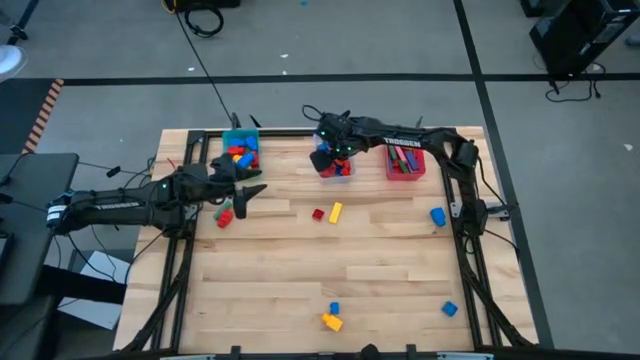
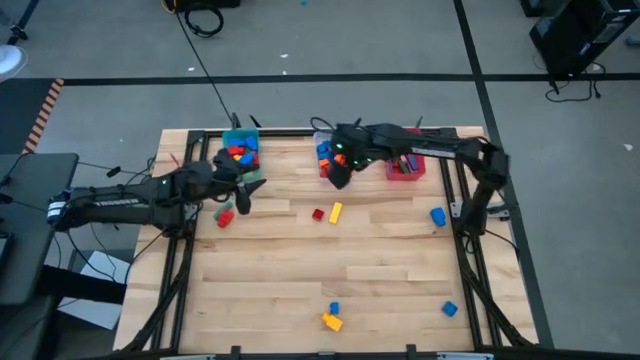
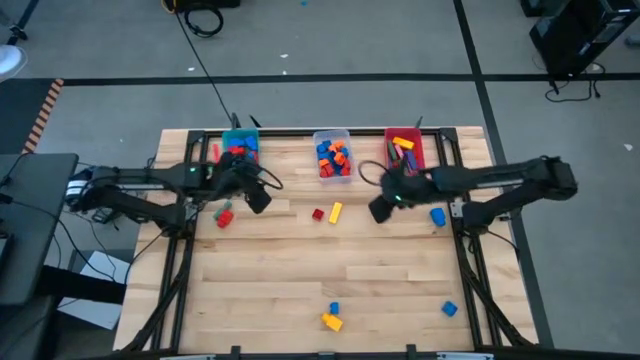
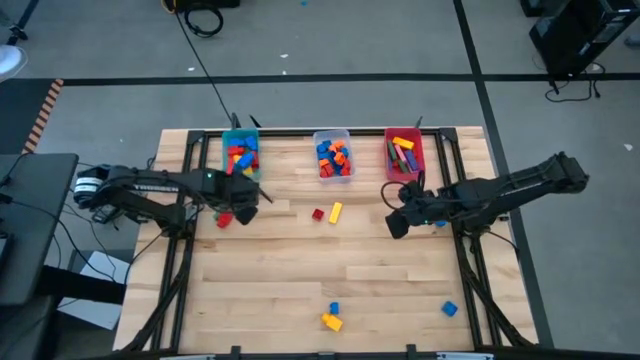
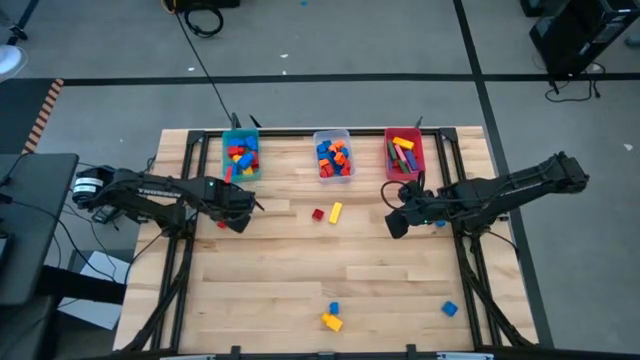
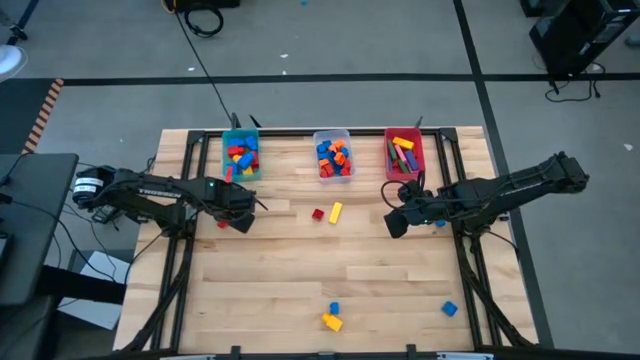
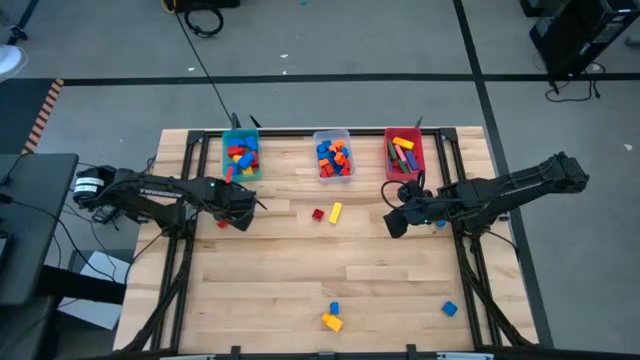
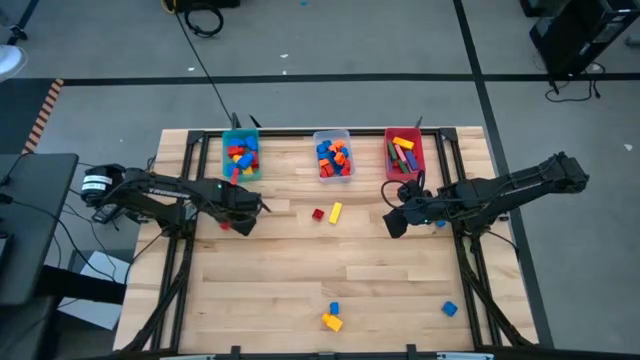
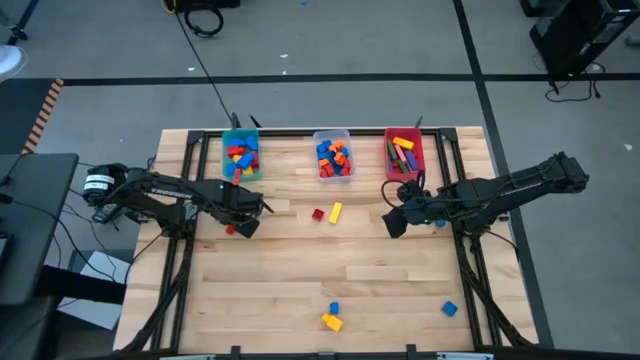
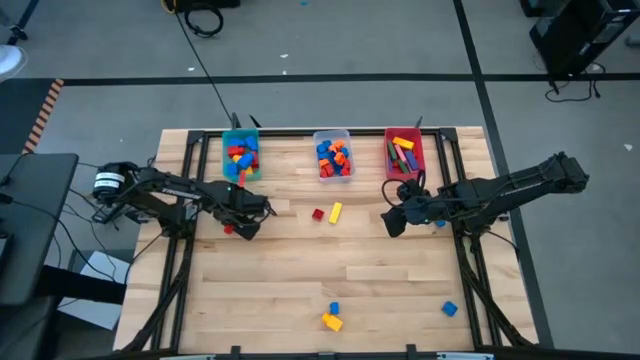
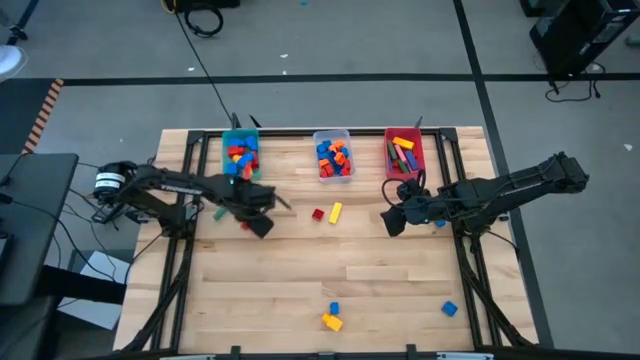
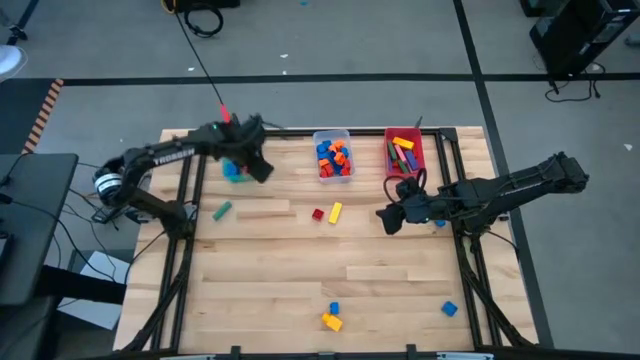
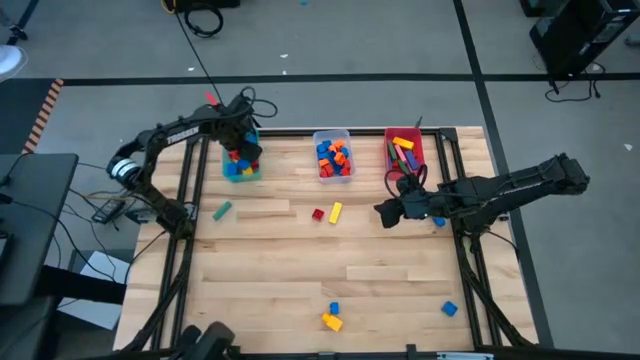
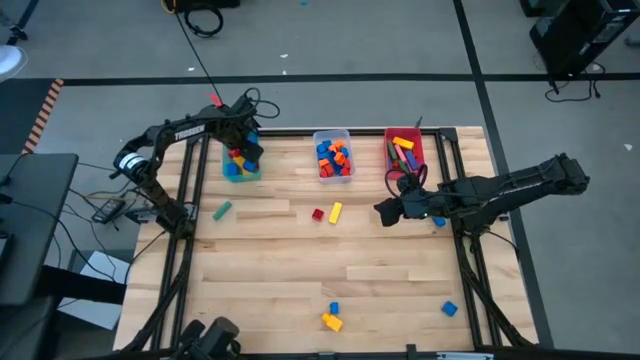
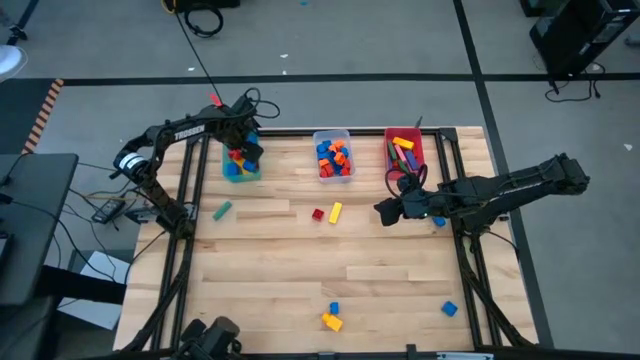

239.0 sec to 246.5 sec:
Task: Sort blocks by size
Put the red 1 stud game piece into the blue bin

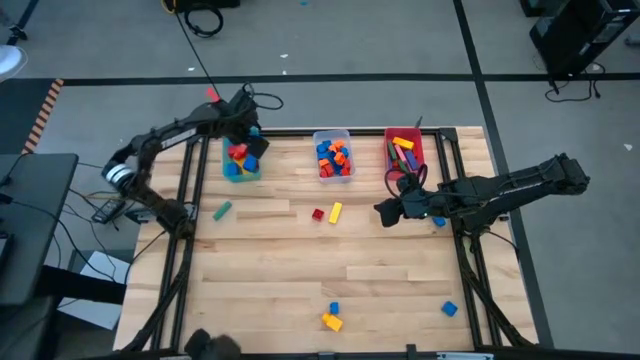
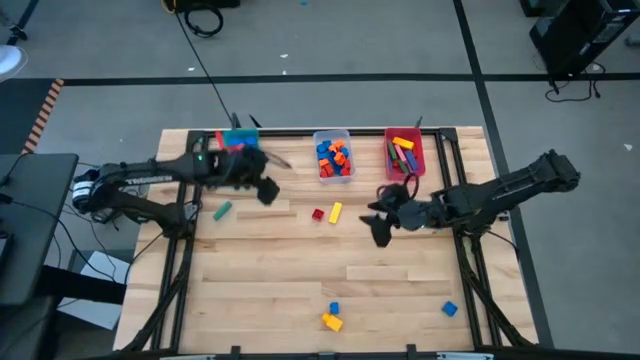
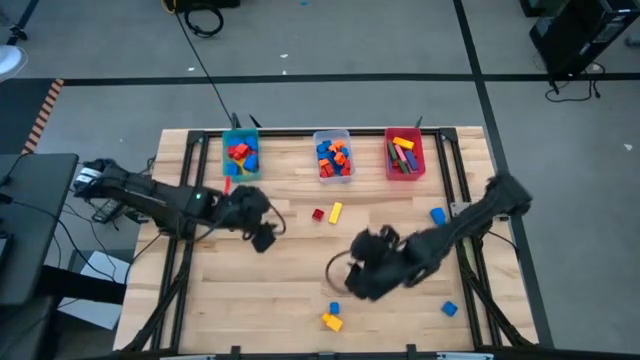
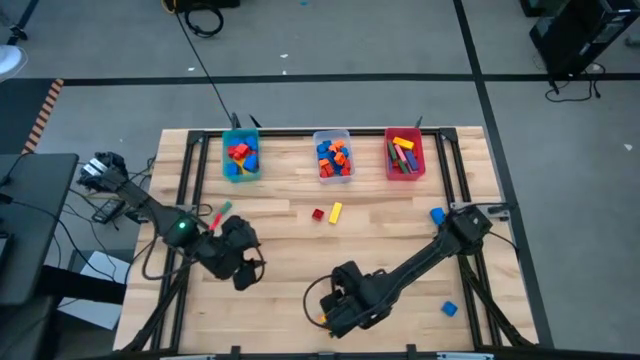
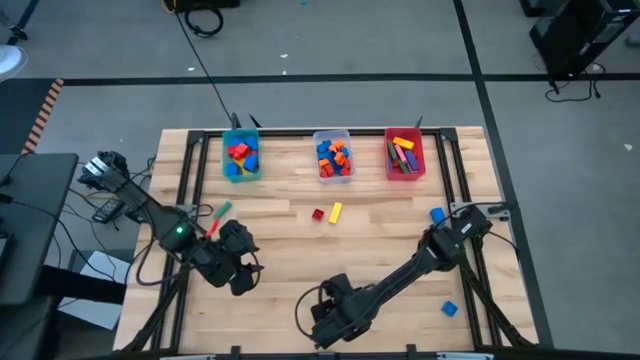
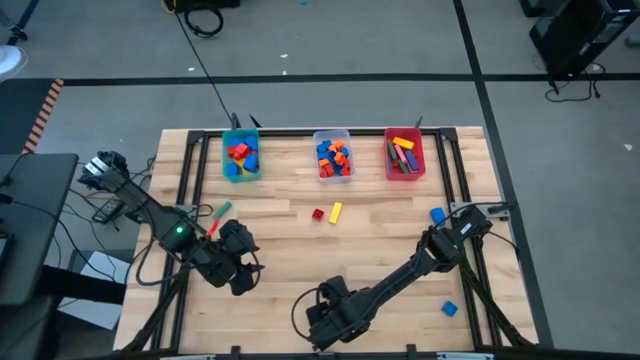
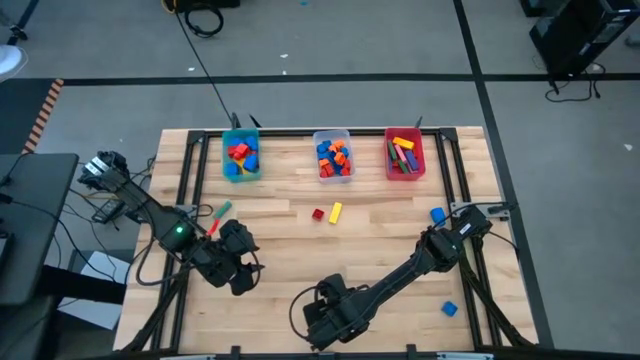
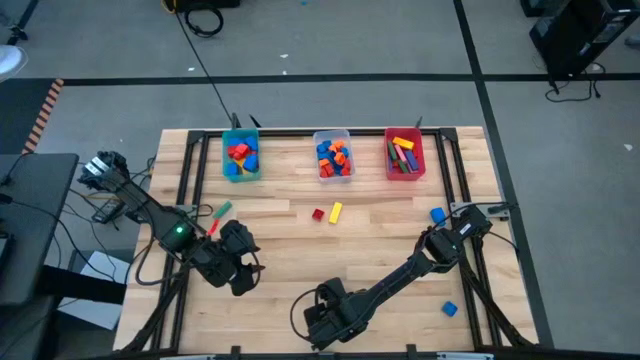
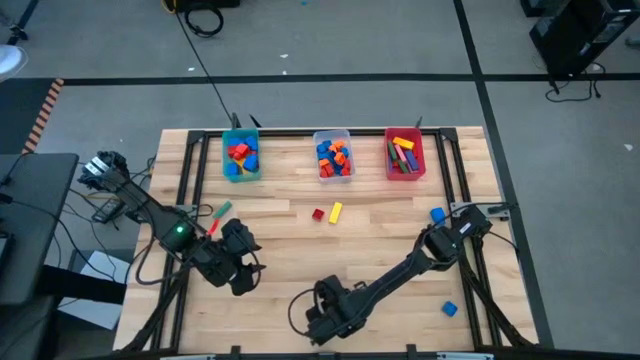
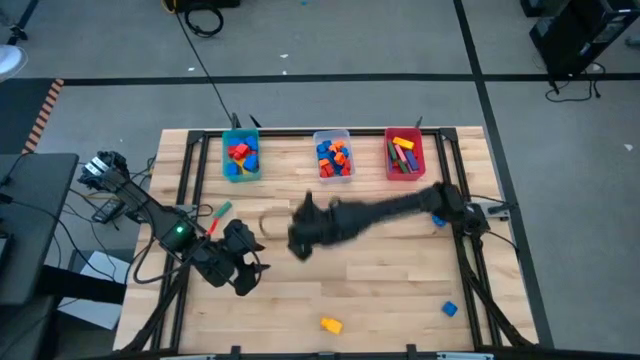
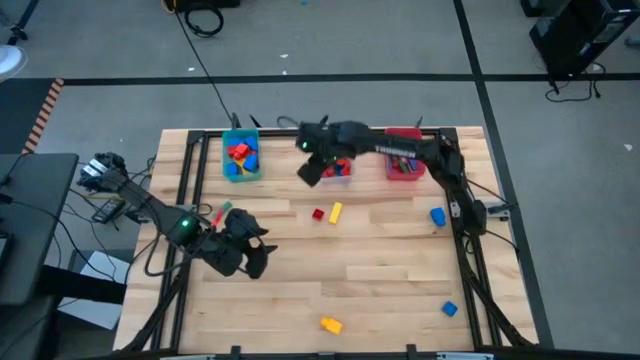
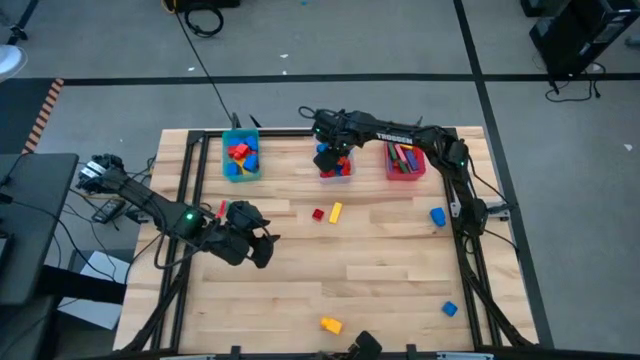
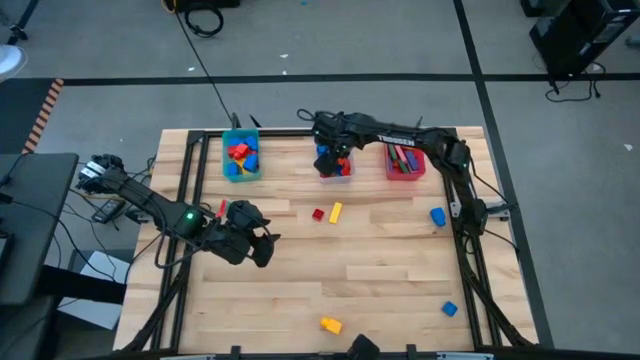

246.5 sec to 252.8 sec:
Put the blue 4 stud game piece into the transparent bin

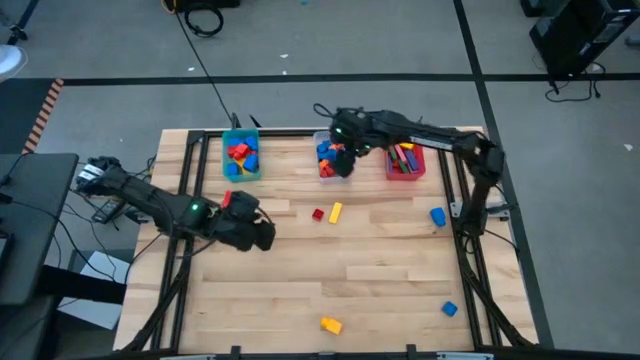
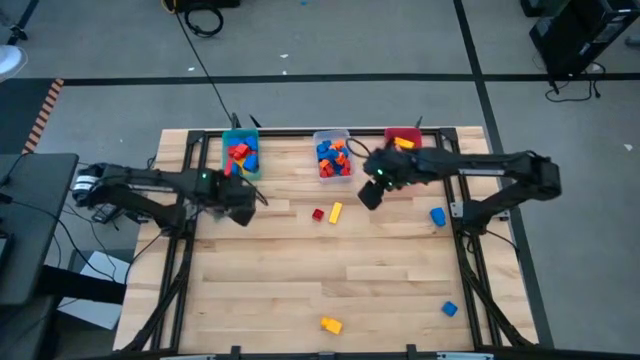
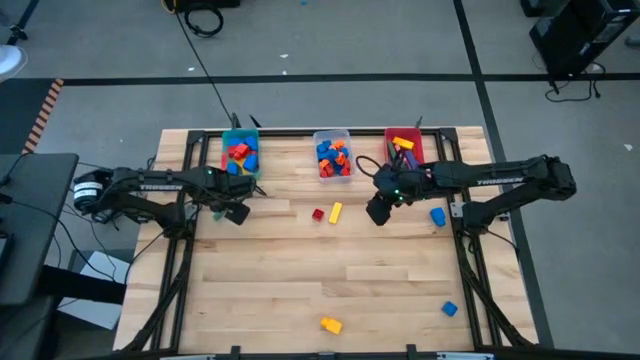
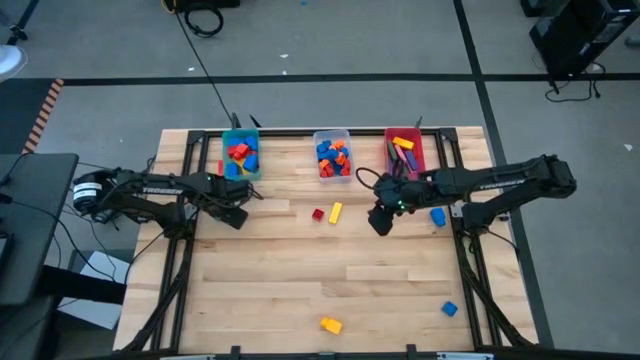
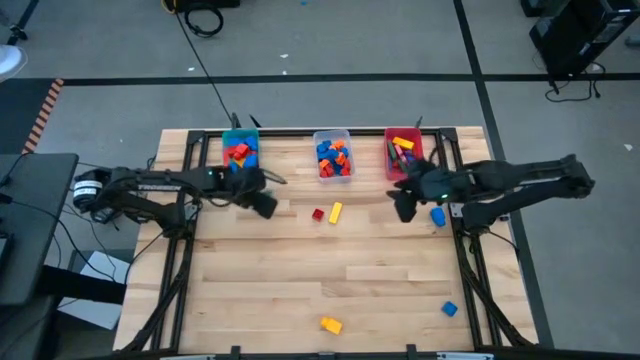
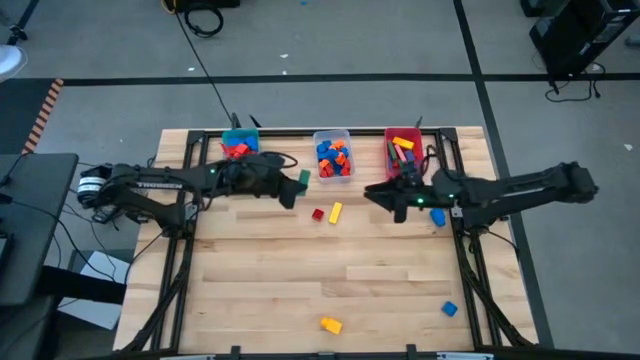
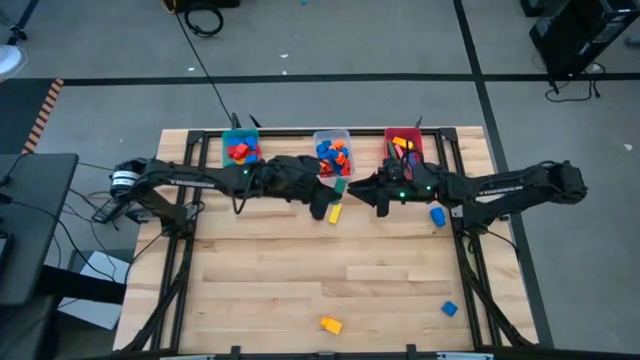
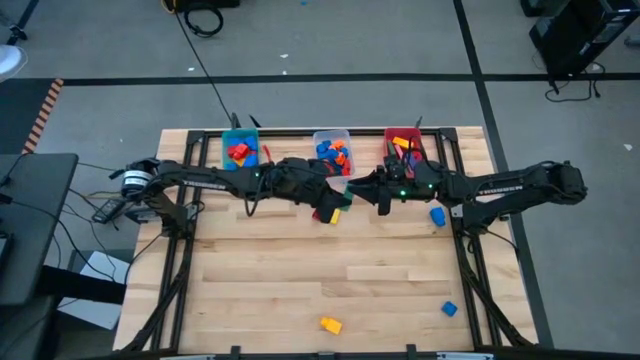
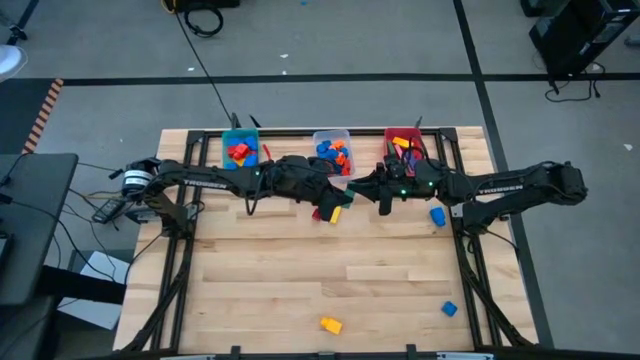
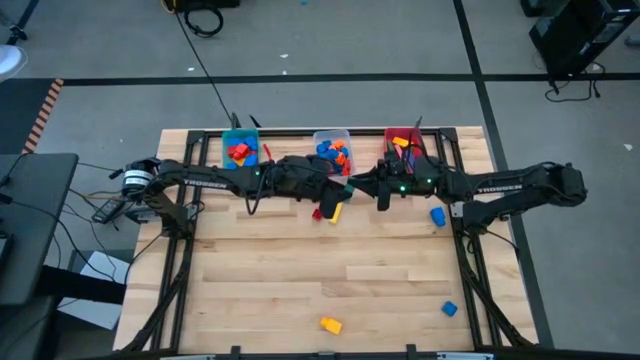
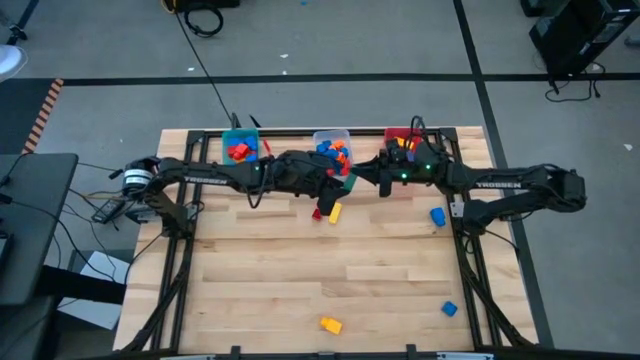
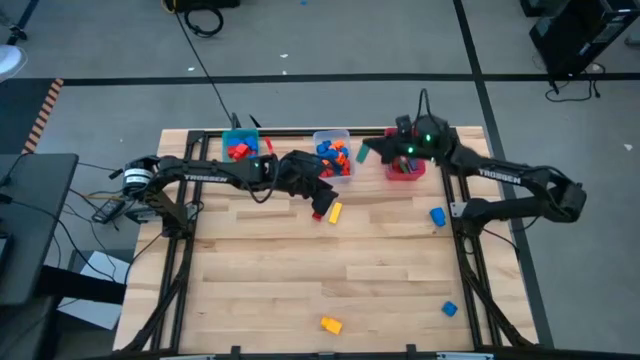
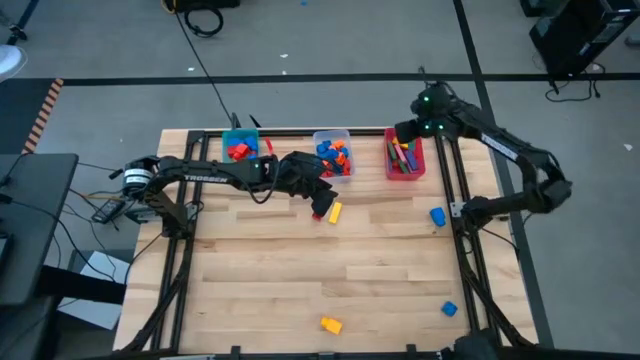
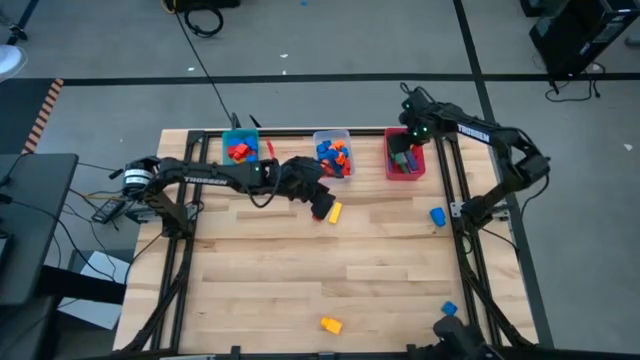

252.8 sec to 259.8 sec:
Put the light blue block into the red bin
